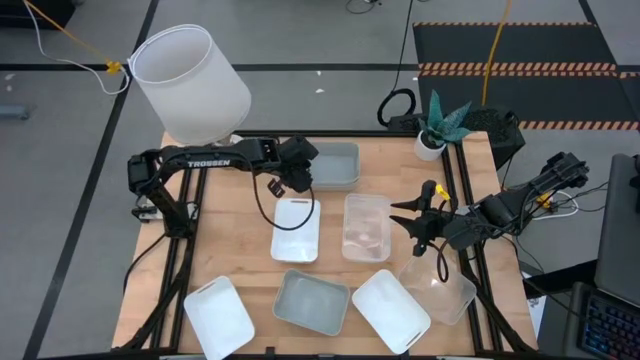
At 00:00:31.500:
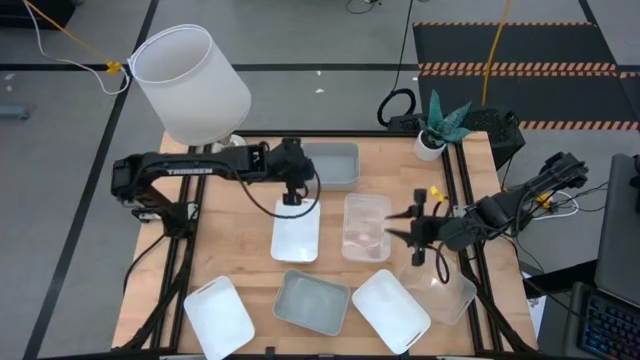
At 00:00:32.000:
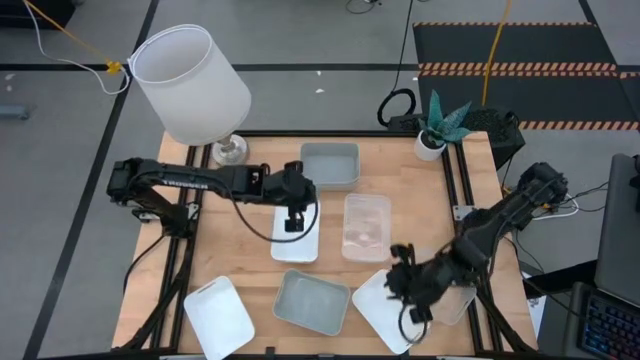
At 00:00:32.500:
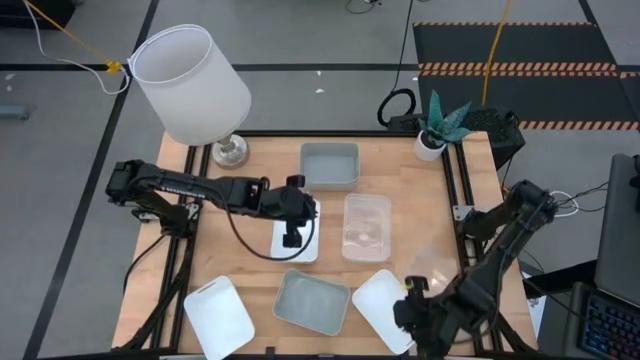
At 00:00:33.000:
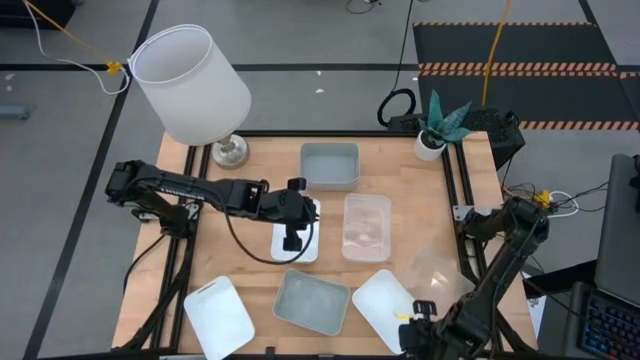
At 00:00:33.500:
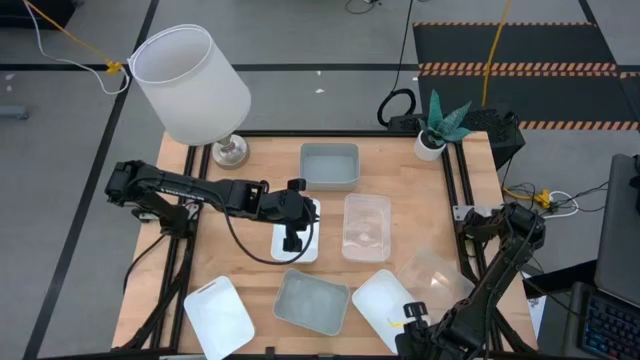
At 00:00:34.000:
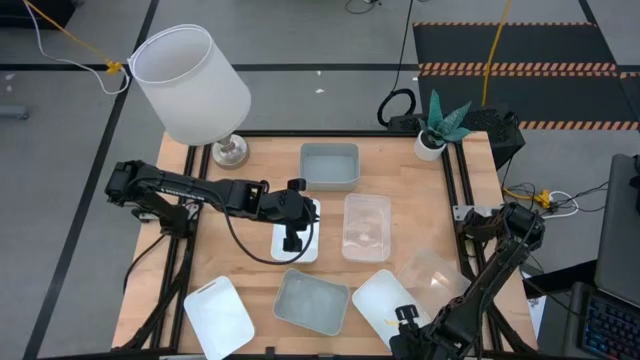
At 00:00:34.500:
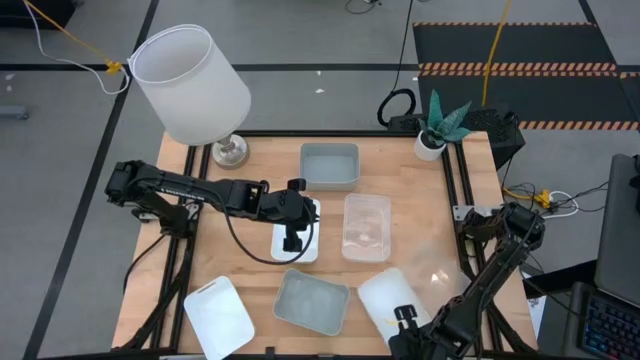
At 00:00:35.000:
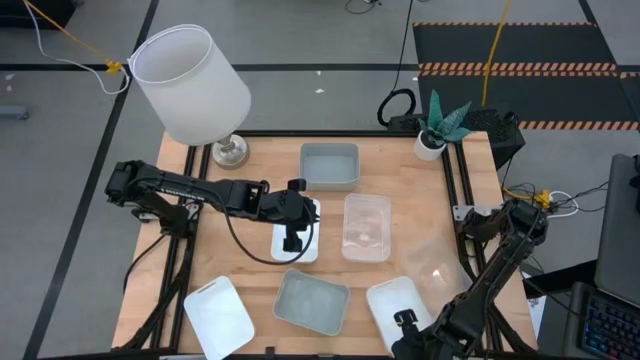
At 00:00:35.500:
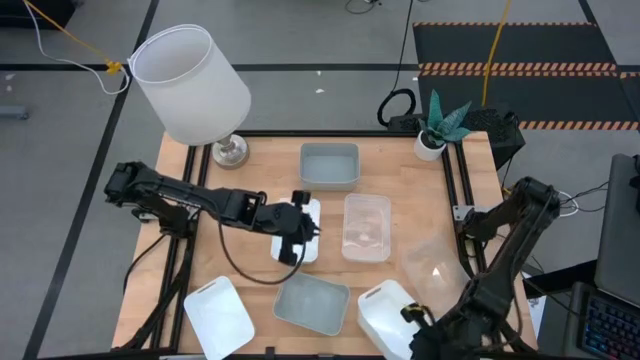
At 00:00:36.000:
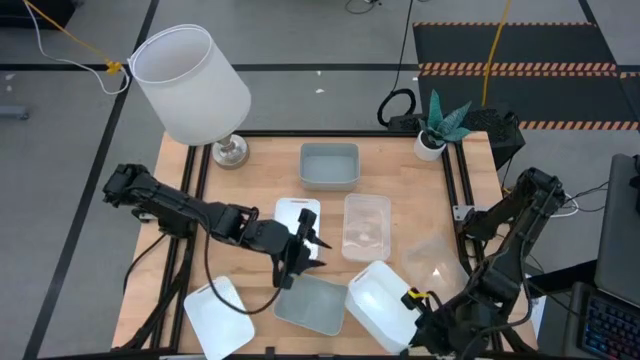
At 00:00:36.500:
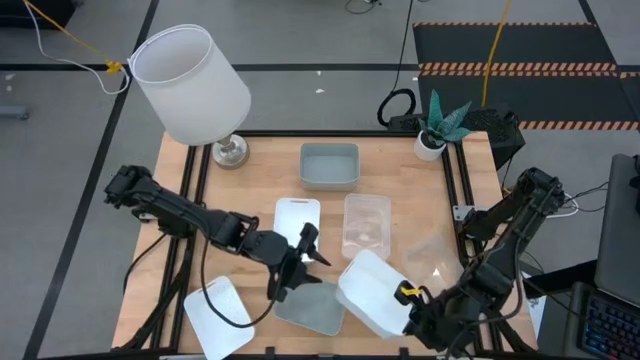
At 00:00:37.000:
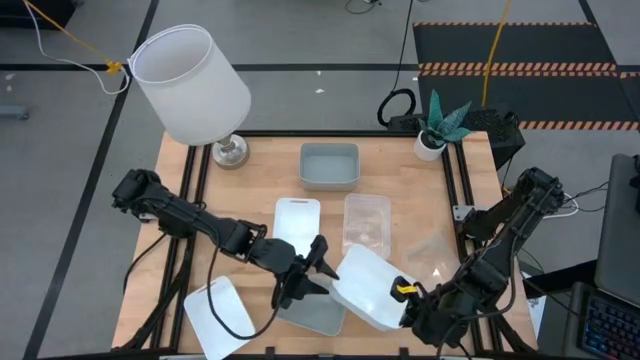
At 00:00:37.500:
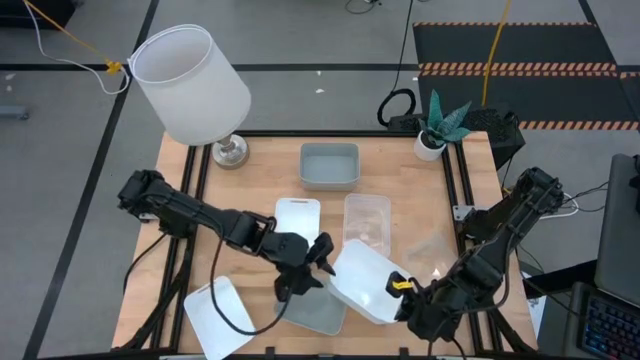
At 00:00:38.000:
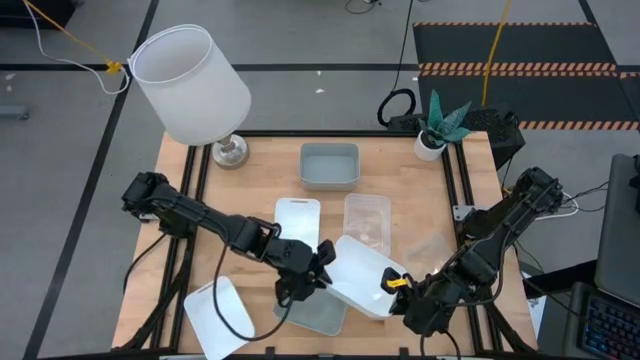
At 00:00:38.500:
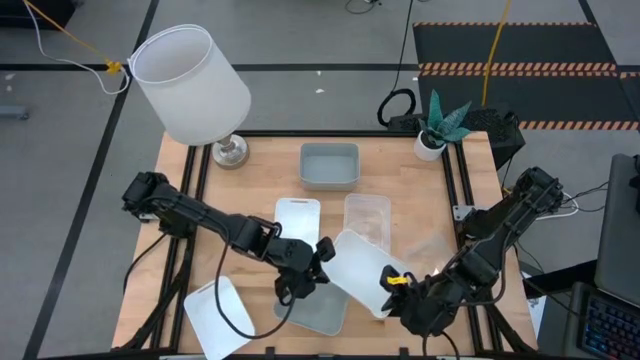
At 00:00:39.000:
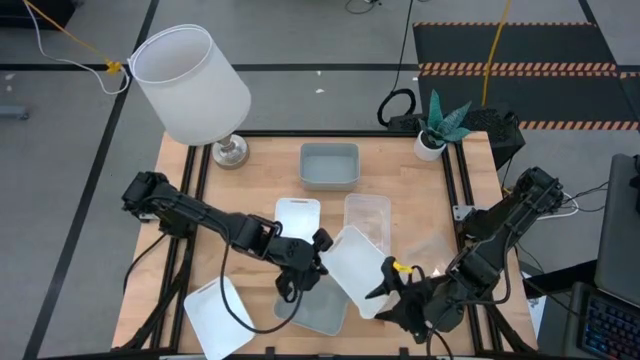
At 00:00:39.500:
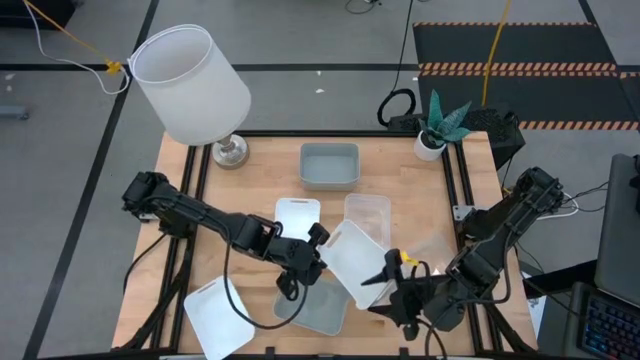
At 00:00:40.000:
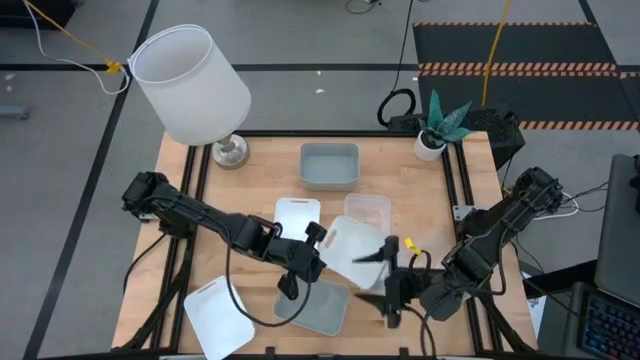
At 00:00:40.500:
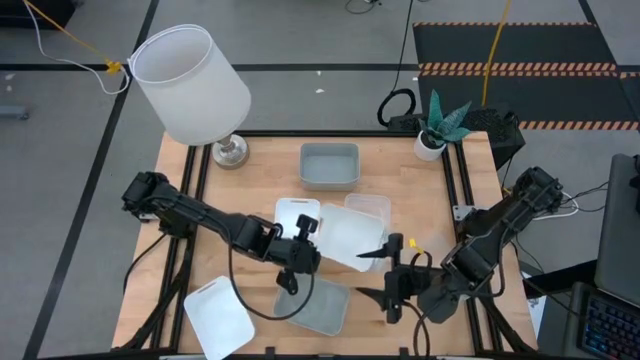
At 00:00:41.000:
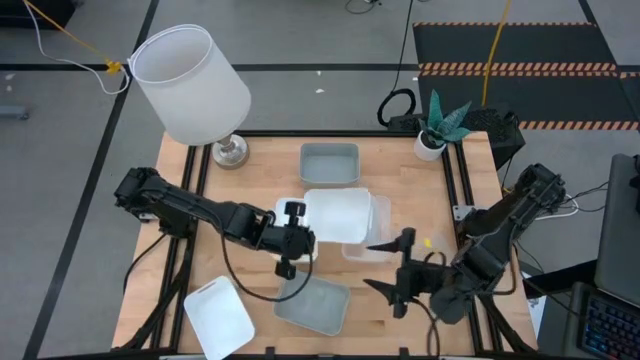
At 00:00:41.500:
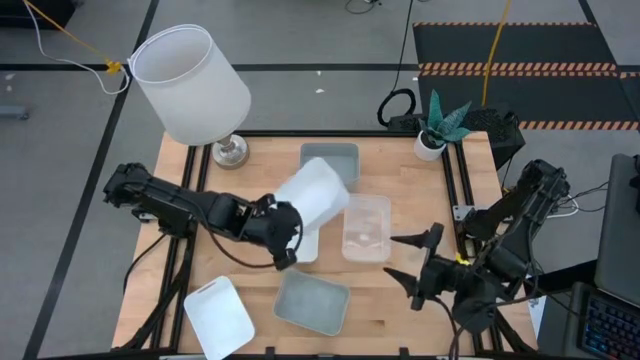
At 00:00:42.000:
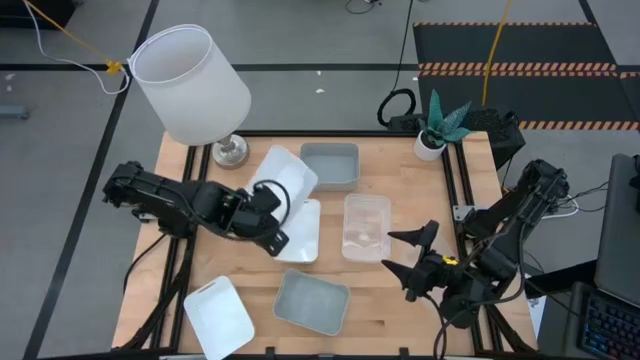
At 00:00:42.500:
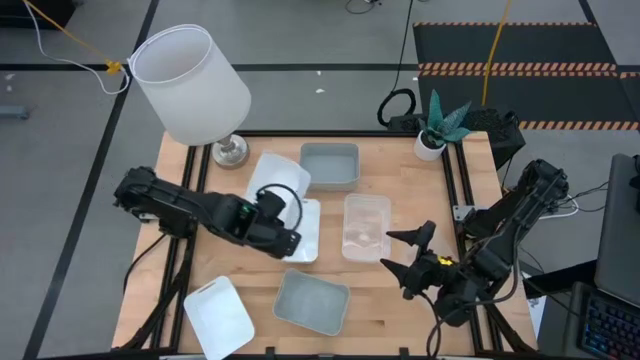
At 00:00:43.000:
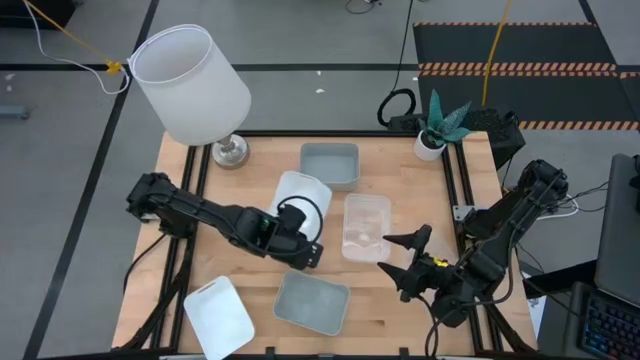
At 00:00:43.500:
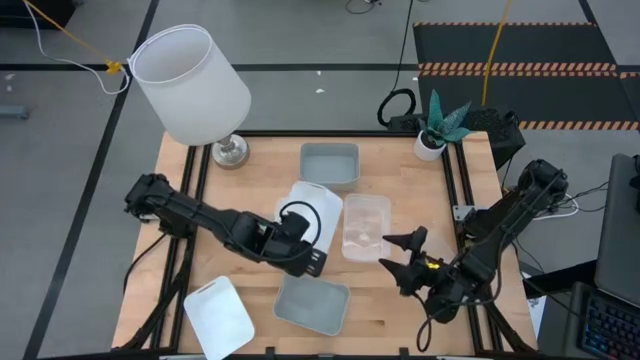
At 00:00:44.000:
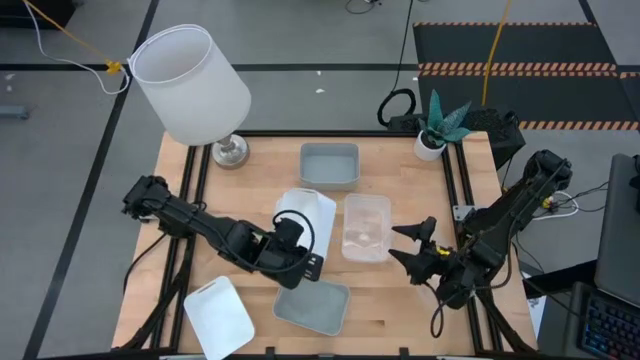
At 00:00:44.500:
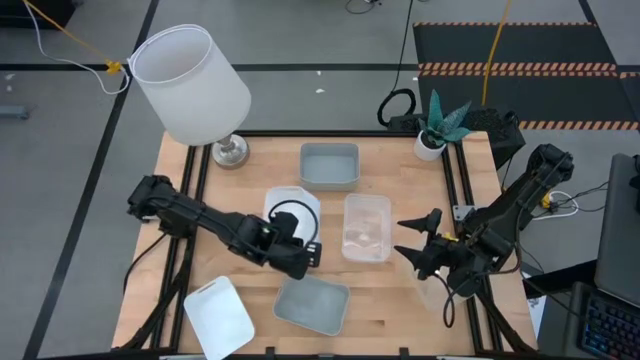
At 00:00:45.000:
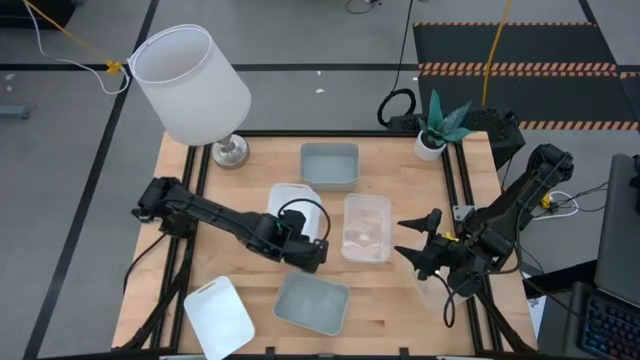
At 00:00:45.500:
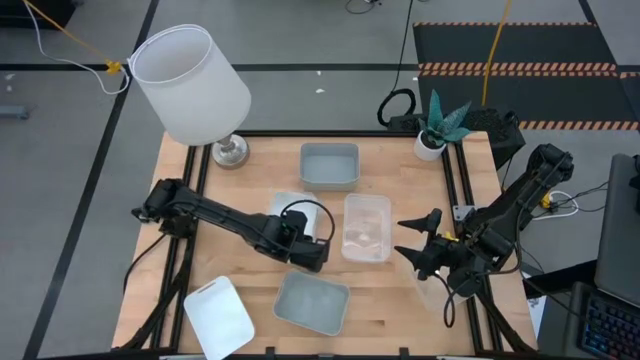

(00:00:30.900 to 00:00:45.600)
Stack the right white bin on top of the top white bin
